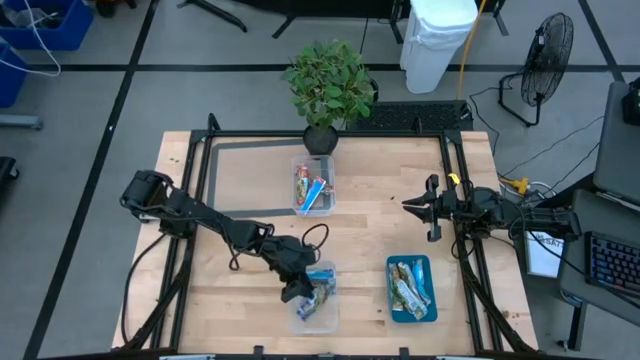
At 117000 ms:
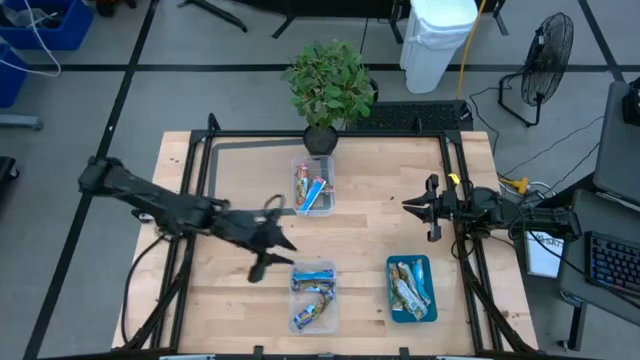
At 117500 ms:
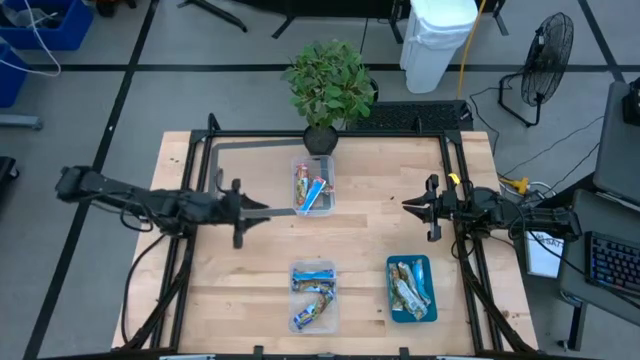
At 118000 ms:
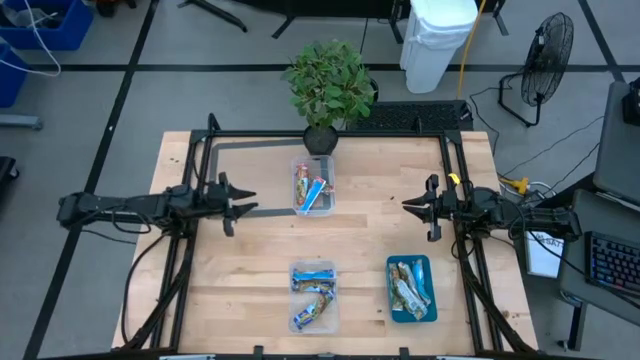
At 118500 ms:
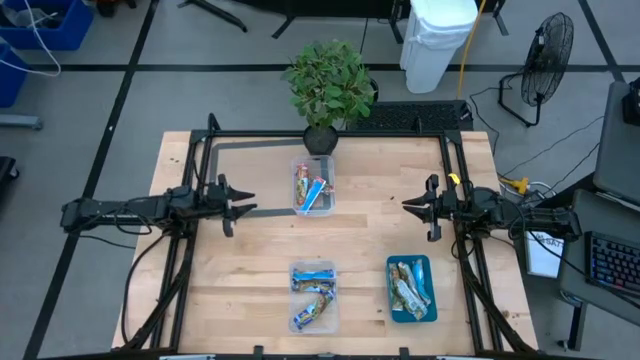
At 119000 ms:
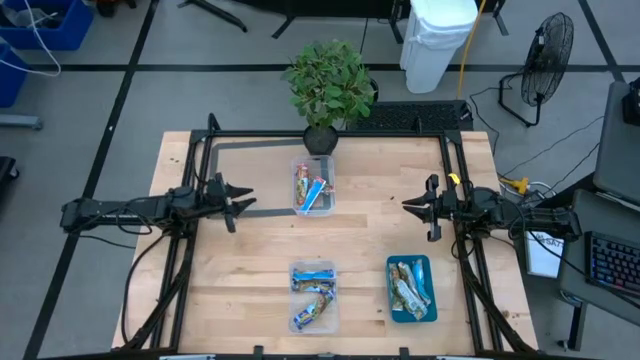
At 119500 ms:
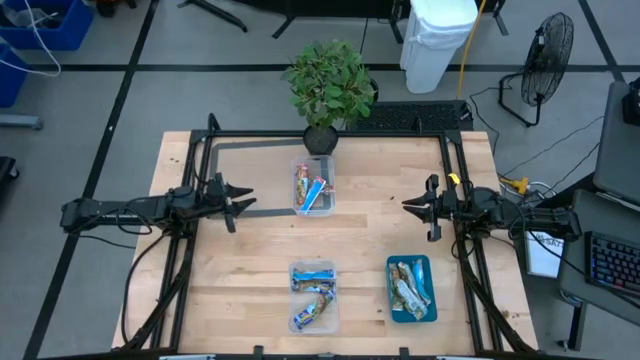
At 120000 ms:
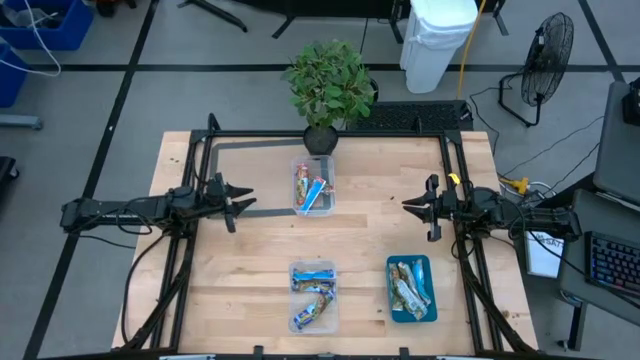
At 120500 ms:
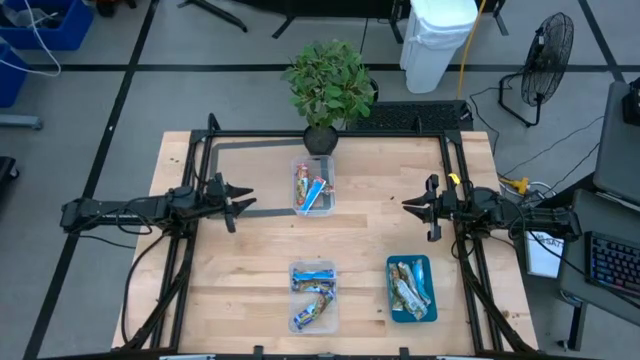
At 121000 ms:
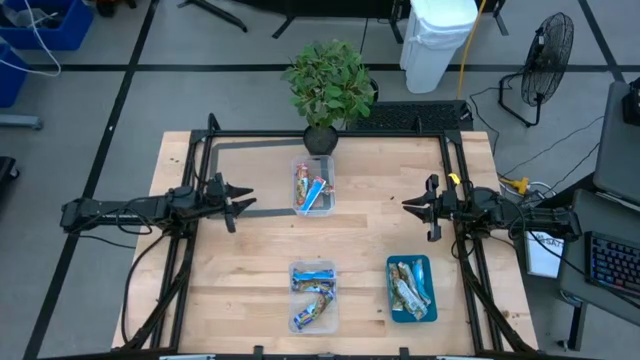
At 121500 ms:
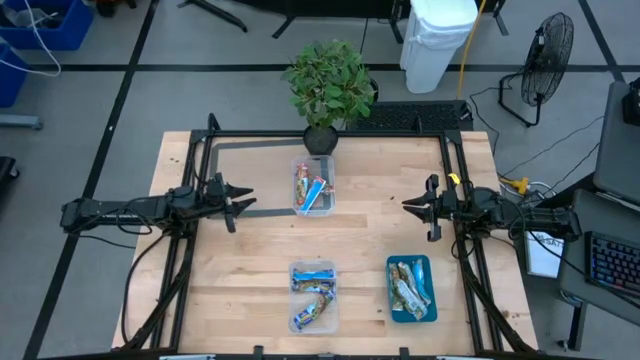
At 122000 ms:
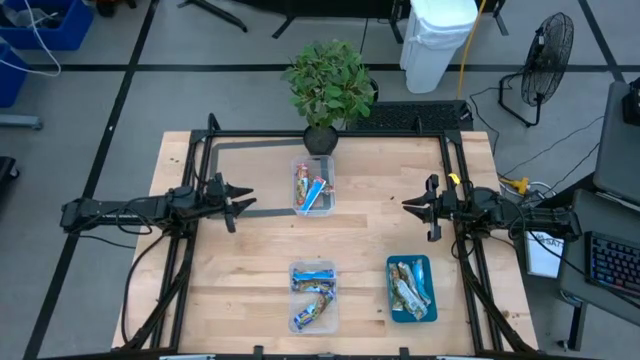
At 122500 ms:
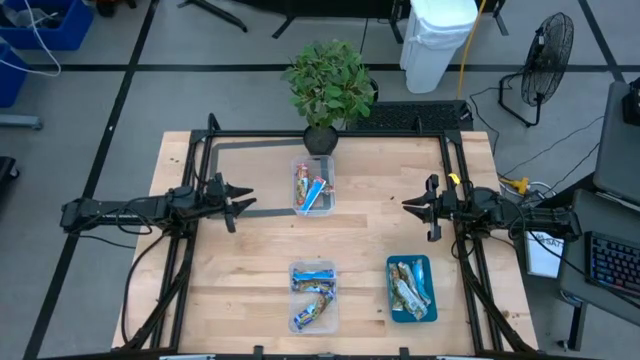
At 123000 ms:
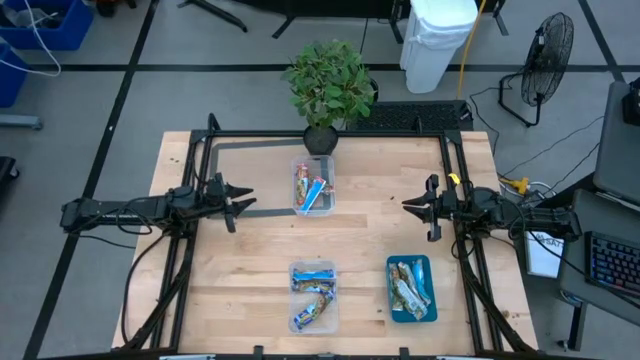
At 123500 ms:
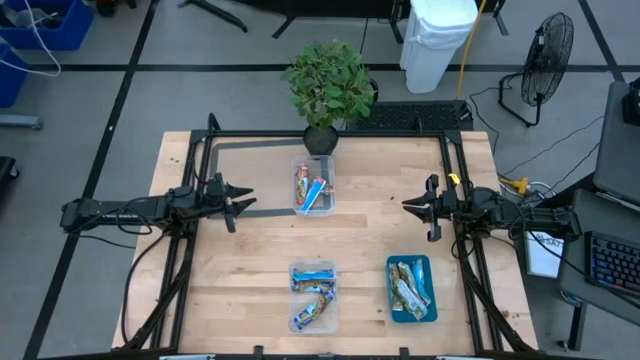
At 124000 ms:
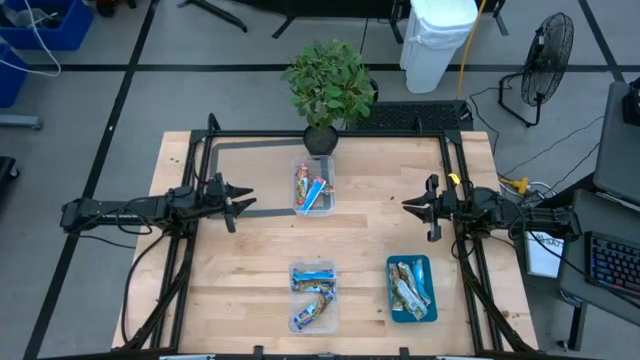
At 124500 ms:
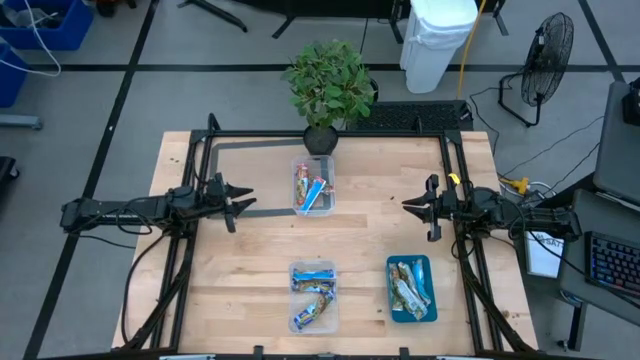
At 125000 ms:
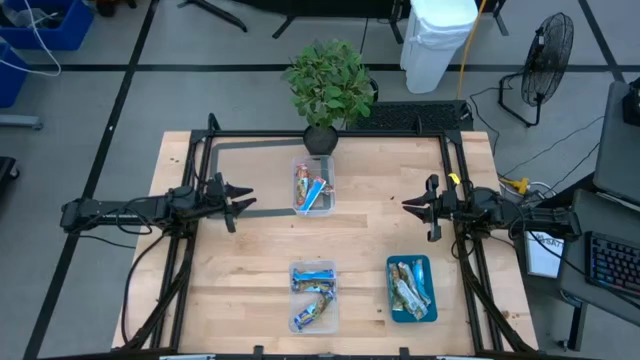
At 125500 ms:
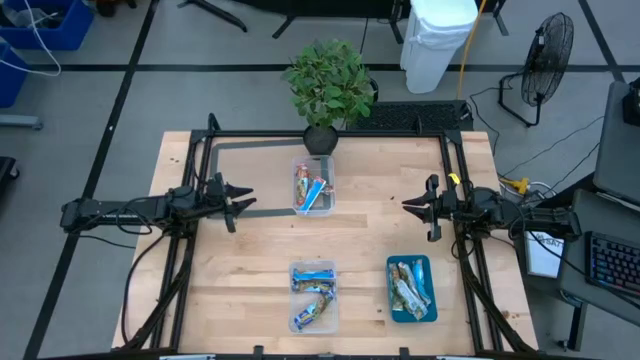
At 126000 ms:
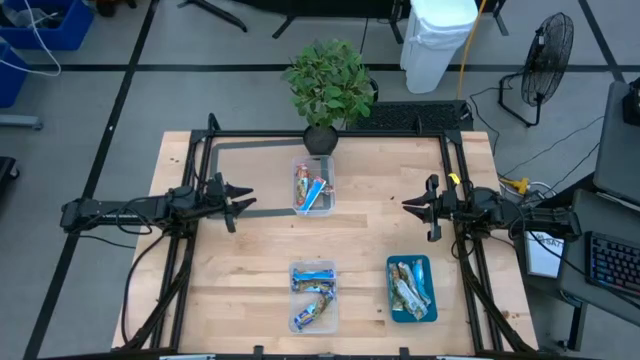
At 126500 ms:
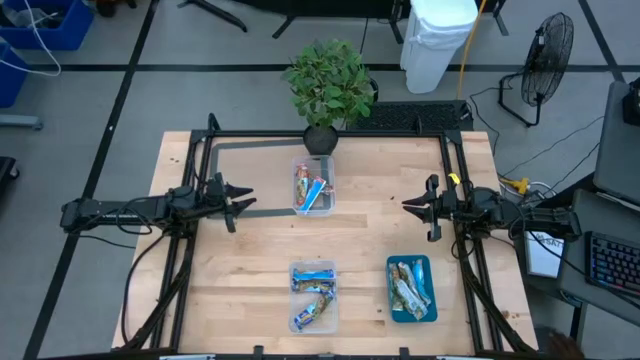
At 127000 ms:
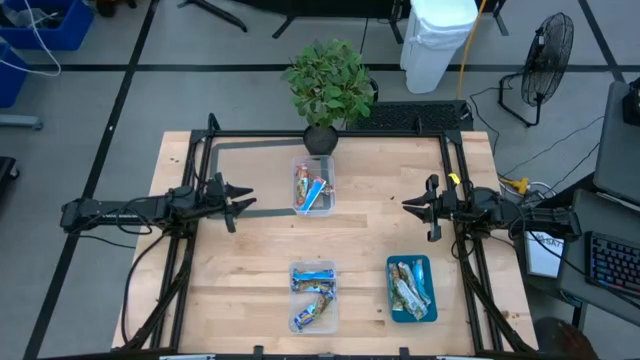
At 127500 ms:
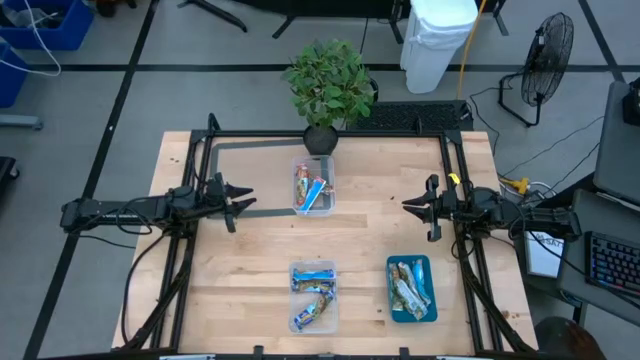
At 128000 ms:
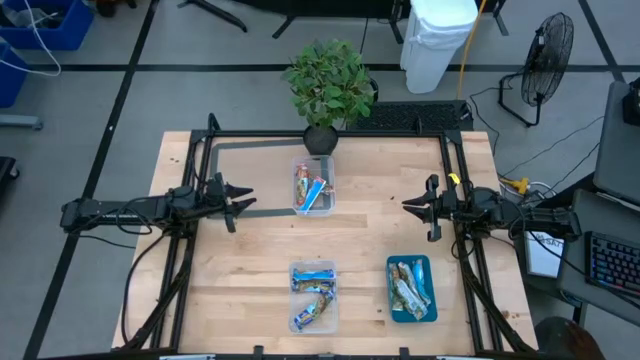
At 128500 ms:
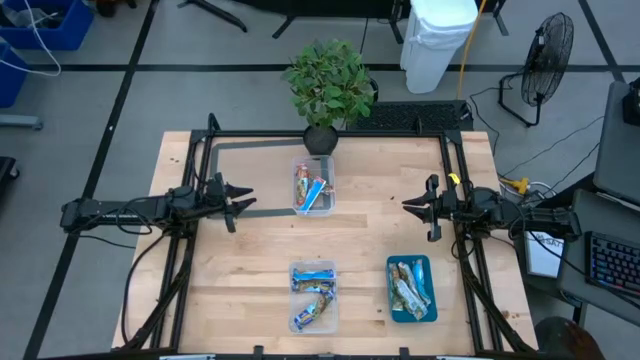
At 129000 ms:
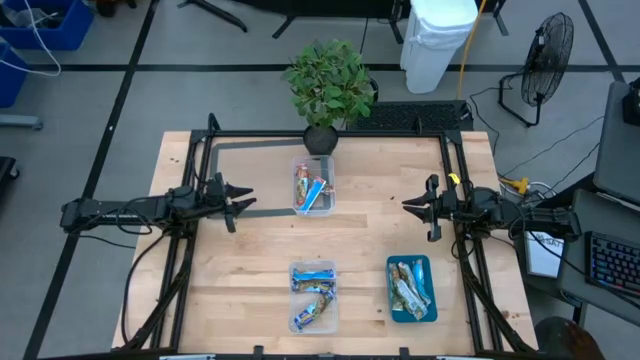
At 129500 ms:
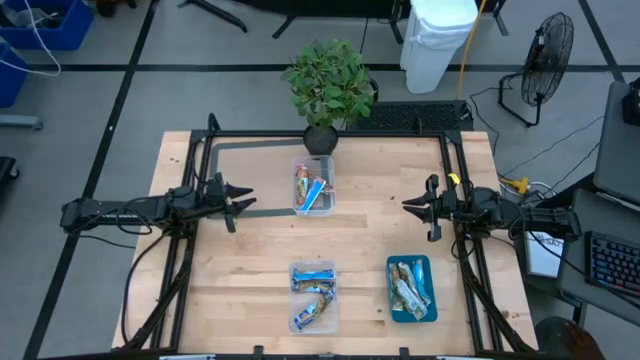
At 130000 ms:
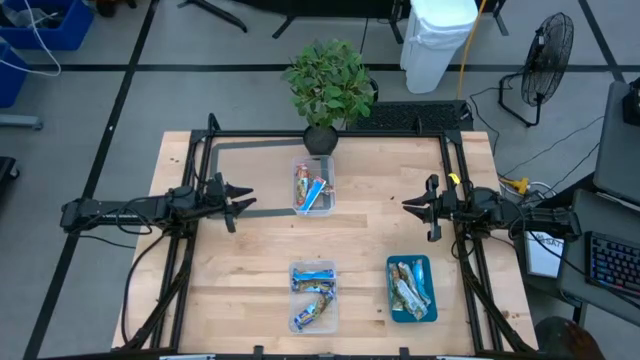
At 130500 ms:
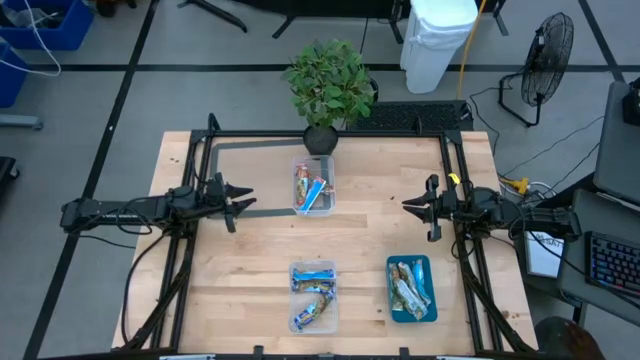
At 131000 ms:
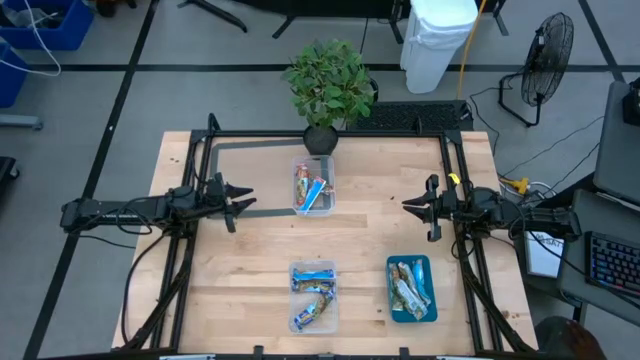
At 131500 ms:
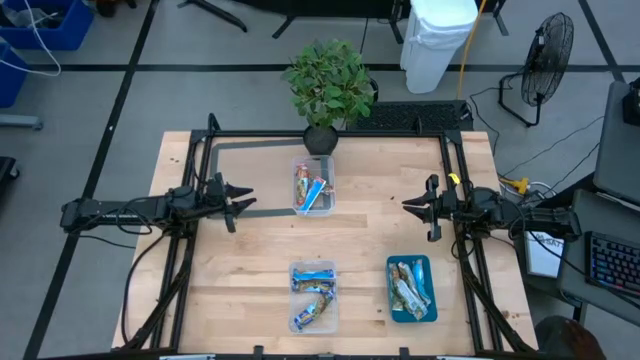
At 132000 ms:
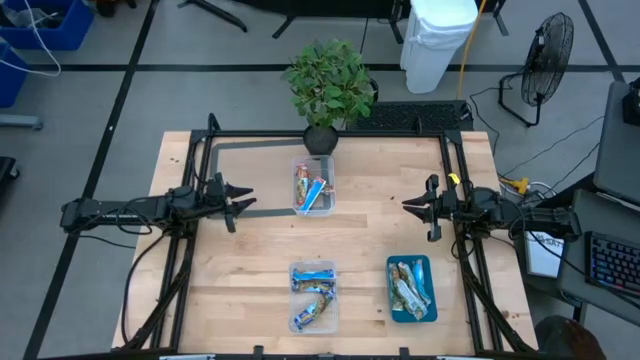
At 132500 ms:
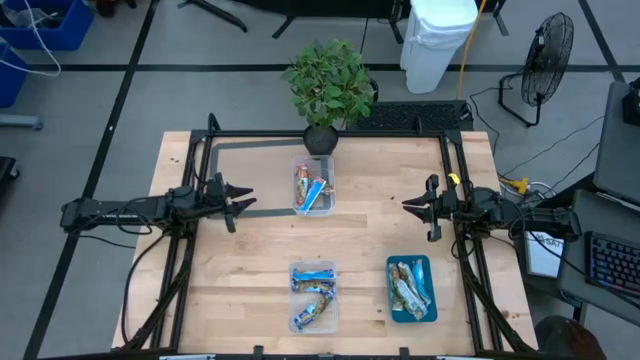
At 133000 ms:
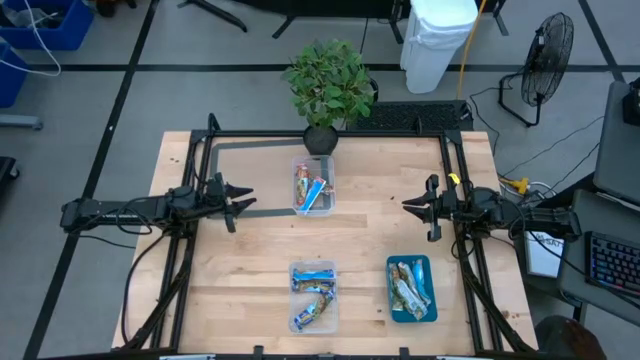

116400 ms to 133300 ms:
Task: Pick and place Granola Bars by type
Return to Home Position

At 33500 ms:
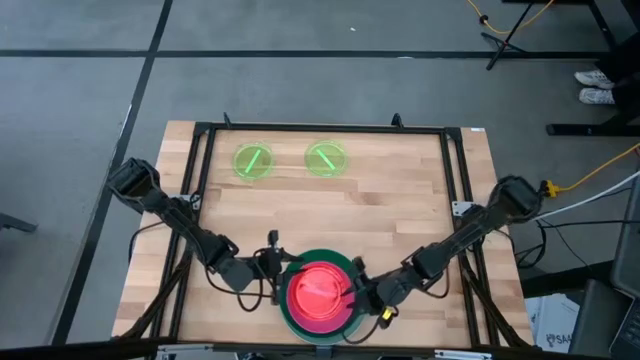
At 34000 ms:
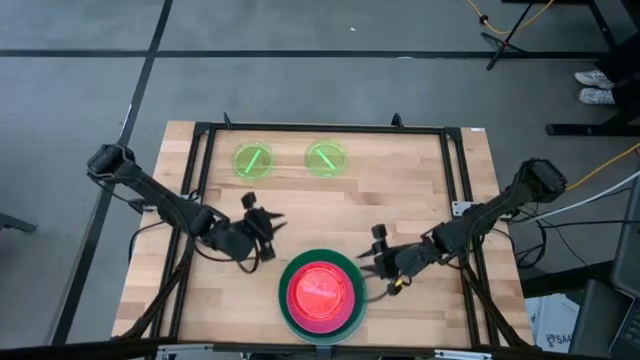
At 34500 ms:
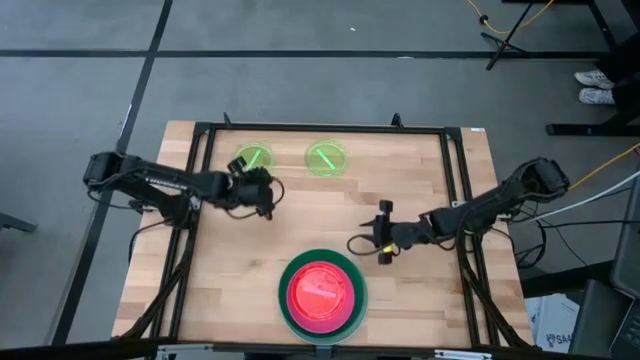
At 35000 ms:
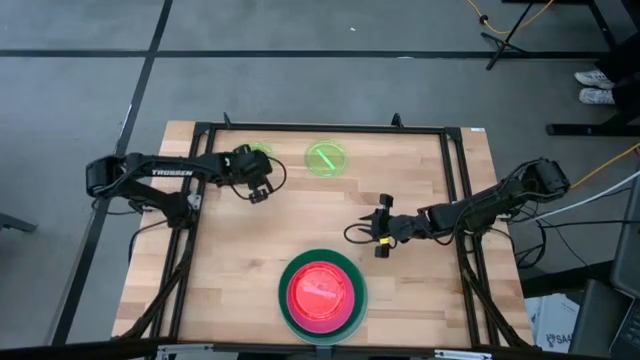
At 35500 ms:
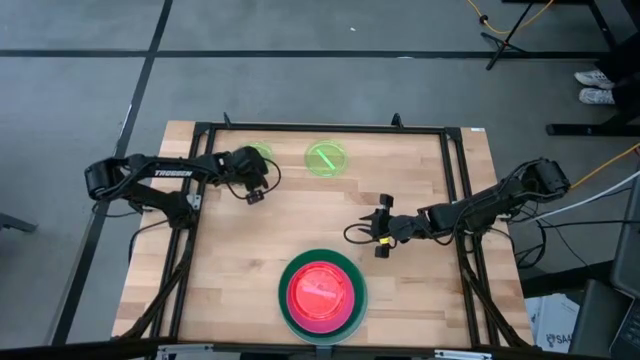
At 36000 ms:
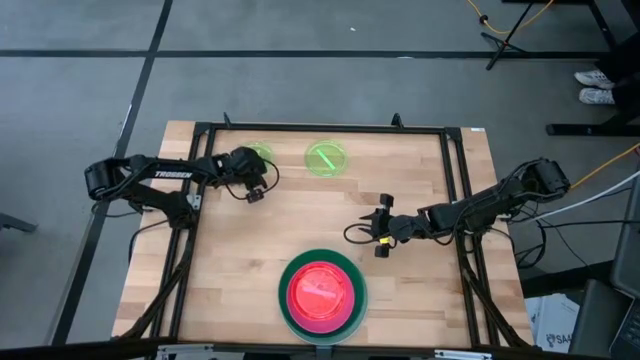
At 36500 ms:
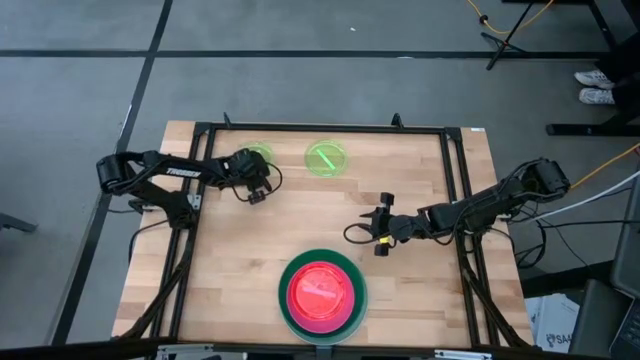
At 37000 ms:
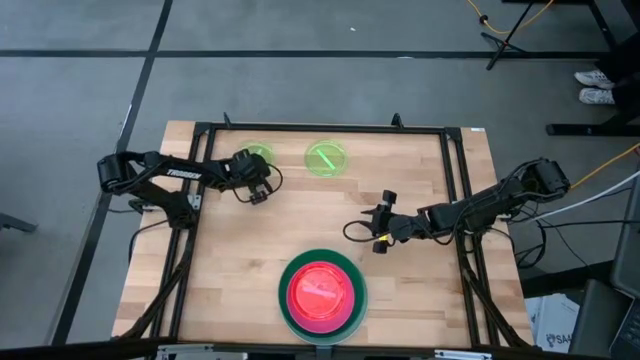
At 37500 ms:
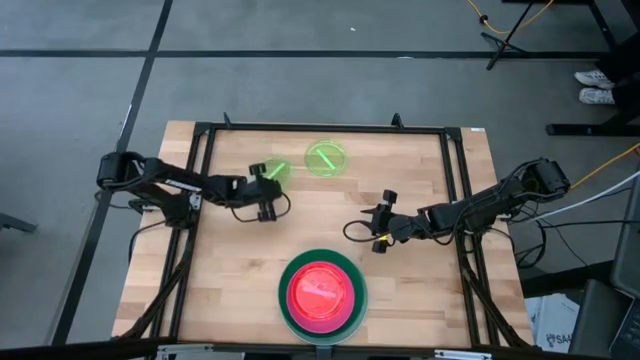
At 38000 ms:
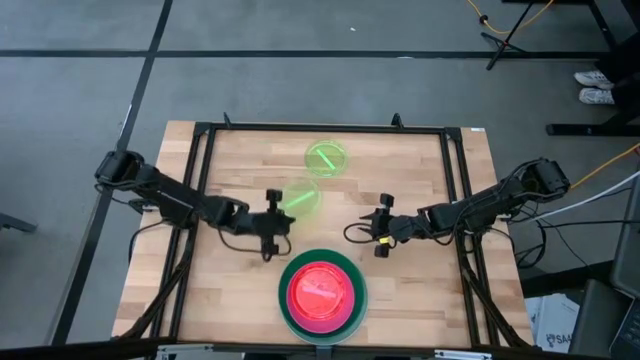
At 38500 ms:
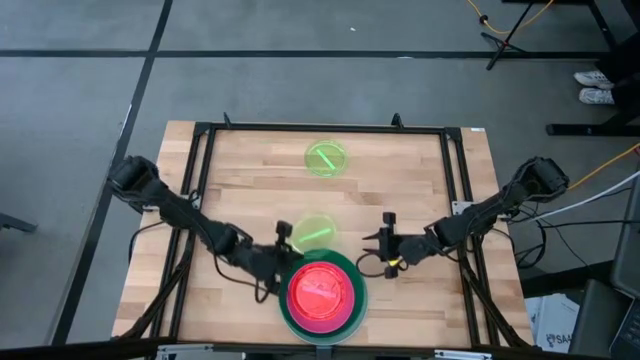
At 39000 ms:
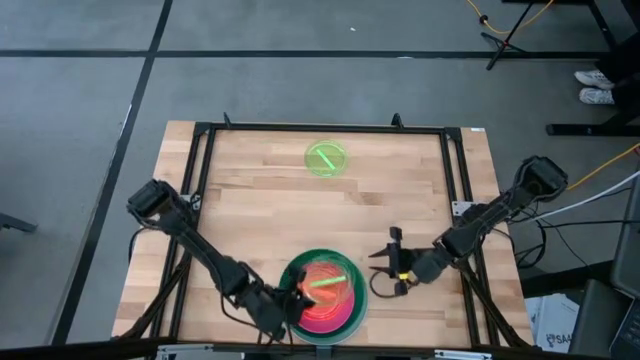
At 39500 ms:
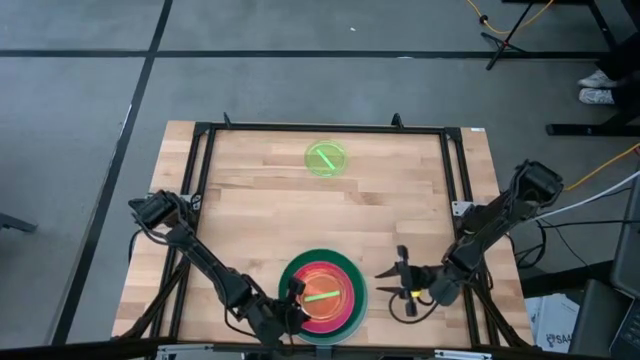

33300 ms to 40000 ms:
Task: Stack plastic plates
Stack the left light green plate on top of the light pink plate
